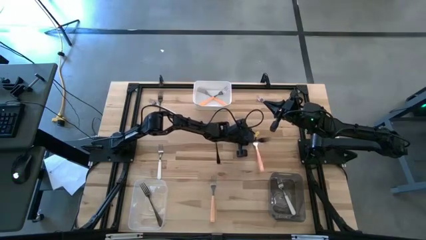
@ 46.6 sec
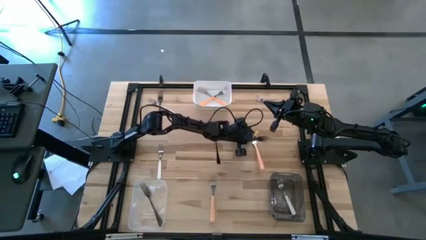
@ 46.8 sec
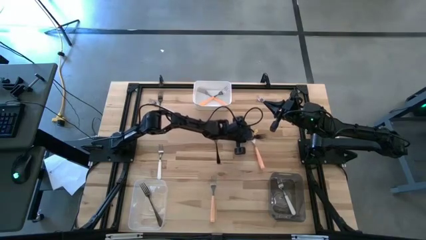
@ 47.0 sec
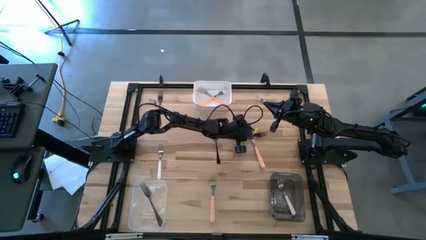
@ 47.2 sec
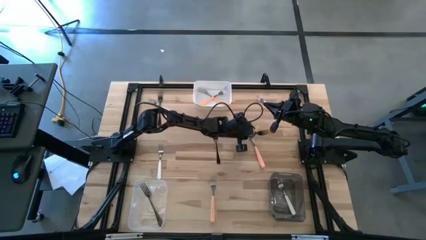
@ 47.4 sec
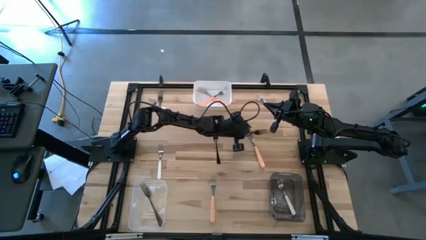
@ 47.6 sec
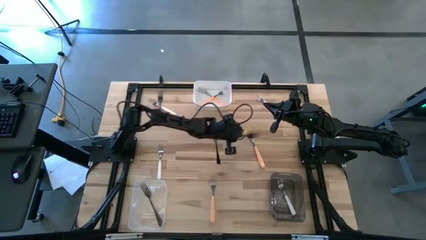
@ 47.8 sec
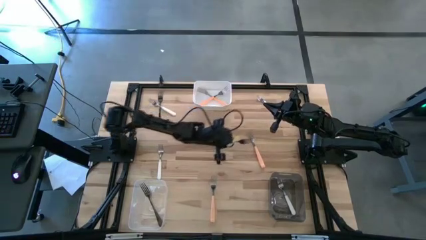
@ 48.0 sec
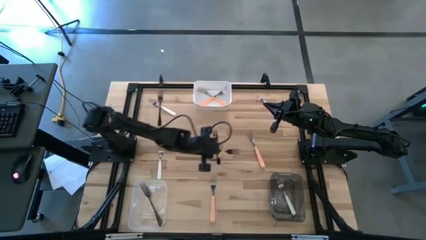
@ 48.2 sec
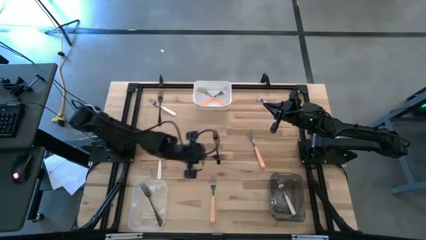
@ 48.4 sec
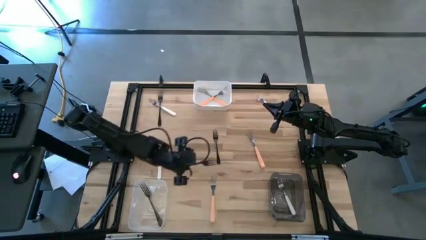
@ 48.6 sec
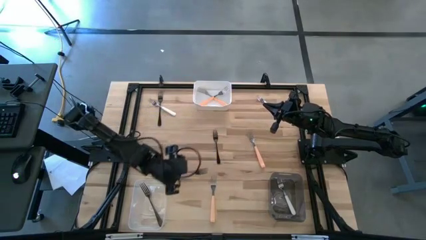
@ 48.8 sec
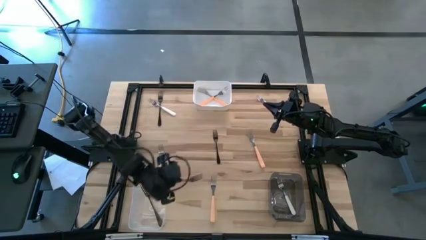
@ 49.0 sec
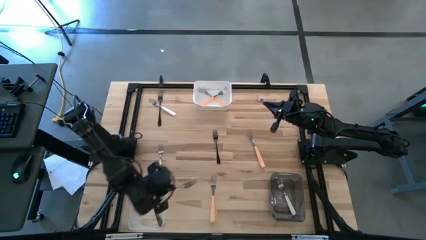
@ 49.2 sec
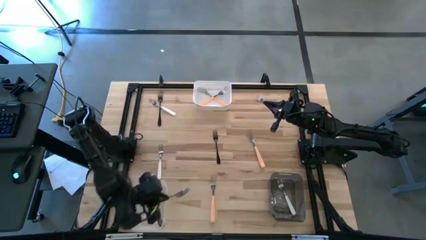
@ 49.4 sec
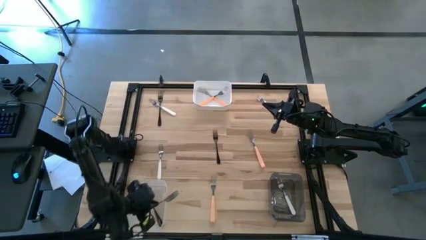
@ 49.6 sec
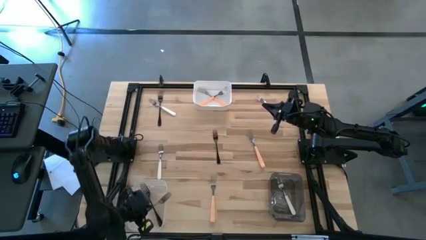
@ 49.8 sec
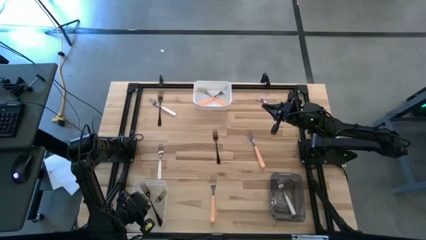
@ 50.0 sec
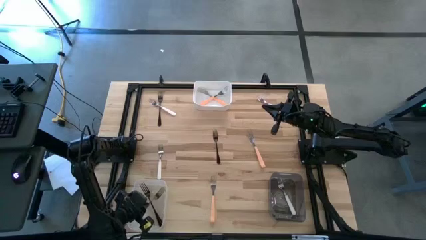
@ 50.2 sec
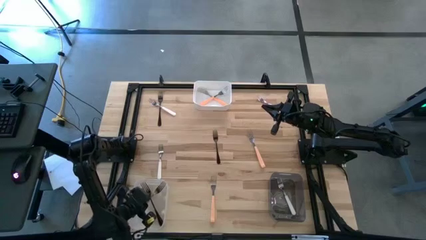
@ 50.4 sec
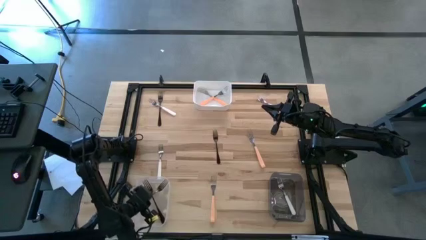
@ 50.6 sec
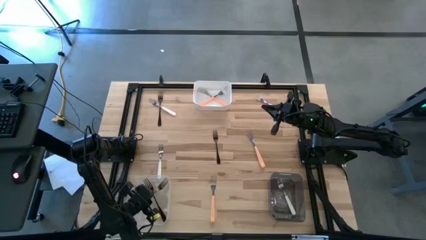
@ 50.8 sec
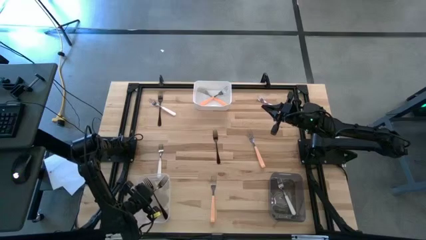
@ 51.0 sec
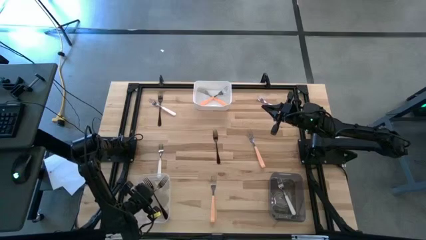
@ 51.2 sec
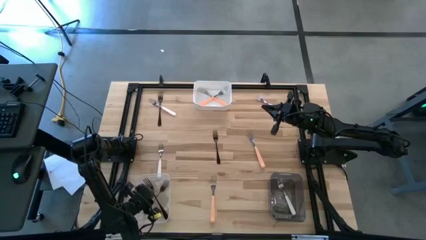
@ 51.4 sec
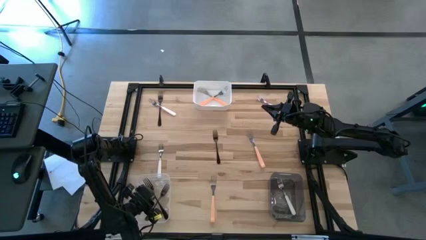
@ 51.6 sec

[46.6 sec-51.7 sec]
Task: Sort silverware by color (type)
Put the middle right silver fork into the transparent bin

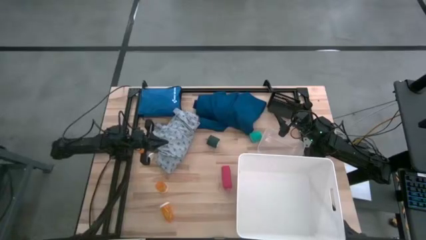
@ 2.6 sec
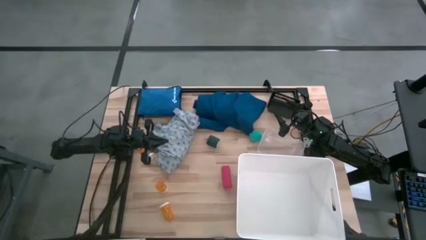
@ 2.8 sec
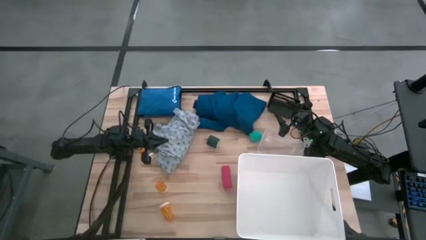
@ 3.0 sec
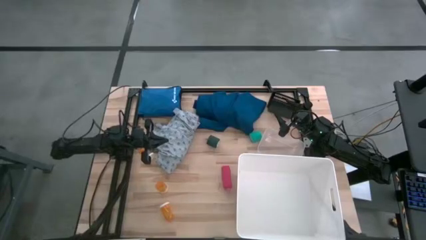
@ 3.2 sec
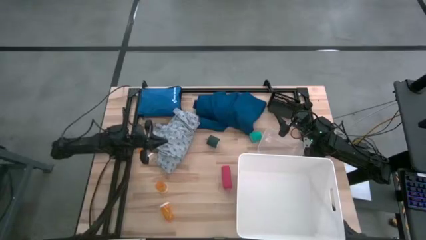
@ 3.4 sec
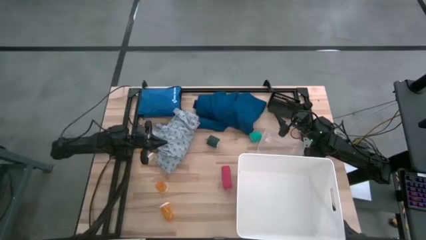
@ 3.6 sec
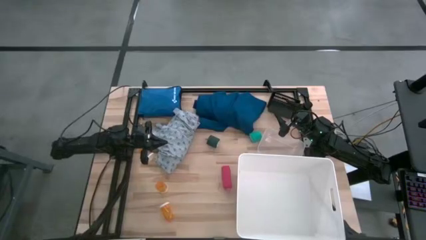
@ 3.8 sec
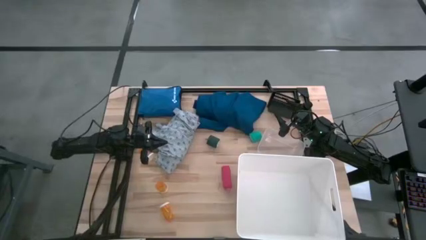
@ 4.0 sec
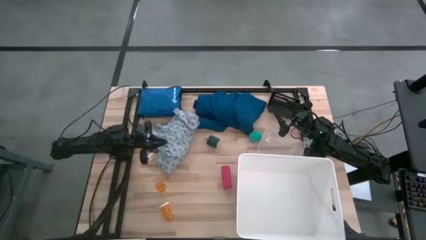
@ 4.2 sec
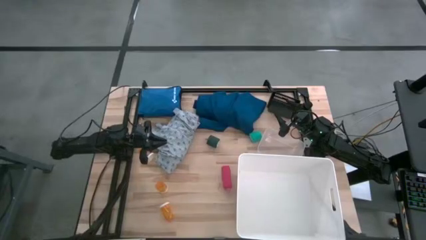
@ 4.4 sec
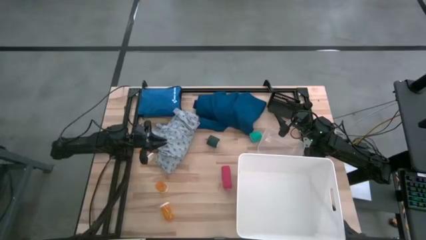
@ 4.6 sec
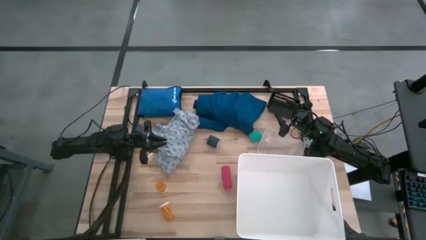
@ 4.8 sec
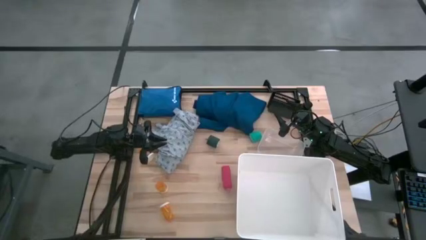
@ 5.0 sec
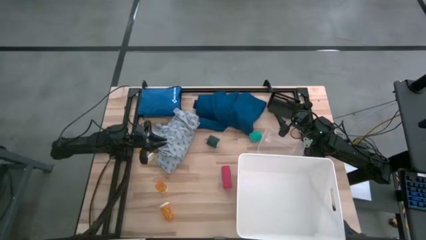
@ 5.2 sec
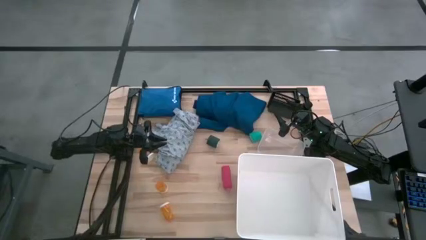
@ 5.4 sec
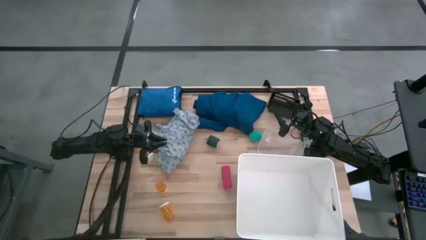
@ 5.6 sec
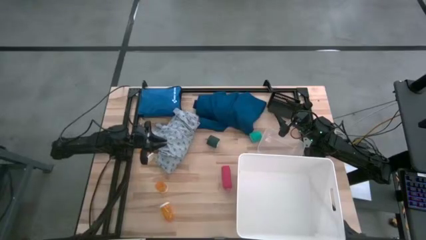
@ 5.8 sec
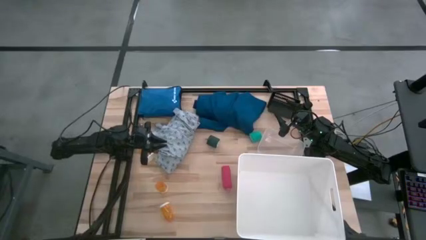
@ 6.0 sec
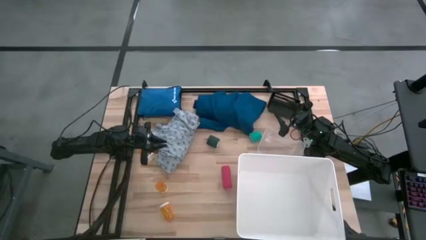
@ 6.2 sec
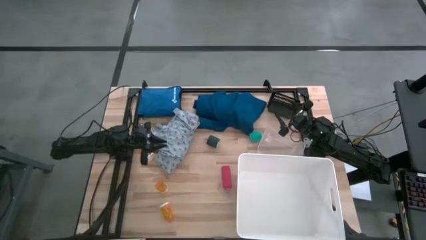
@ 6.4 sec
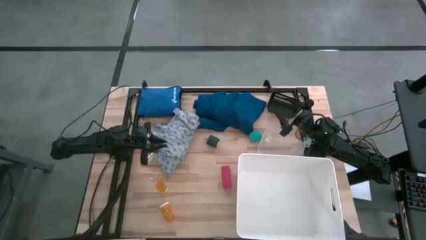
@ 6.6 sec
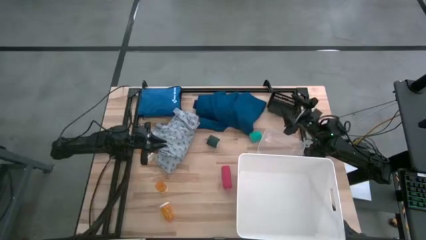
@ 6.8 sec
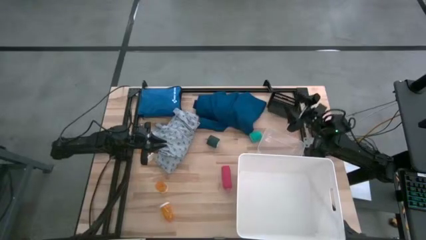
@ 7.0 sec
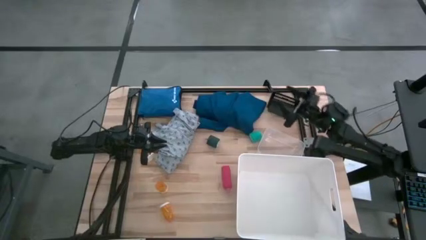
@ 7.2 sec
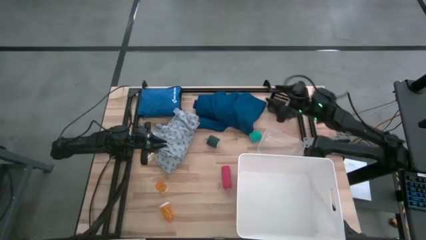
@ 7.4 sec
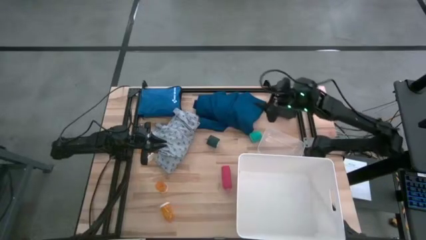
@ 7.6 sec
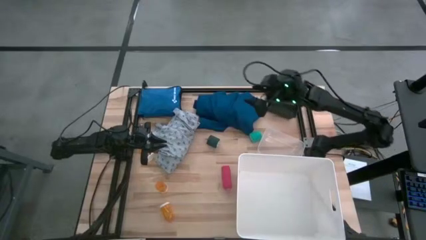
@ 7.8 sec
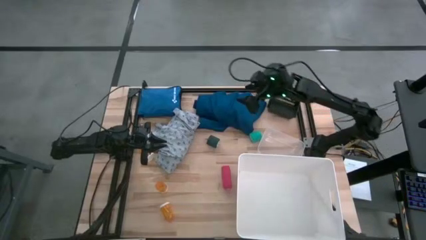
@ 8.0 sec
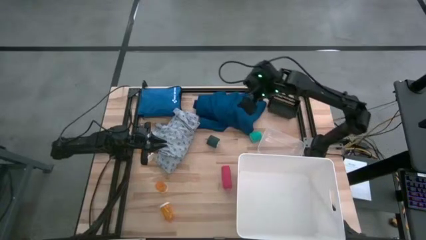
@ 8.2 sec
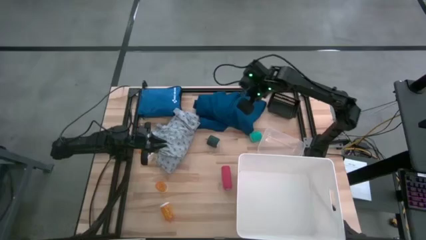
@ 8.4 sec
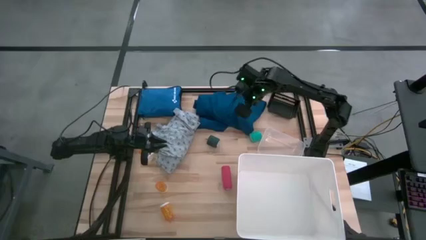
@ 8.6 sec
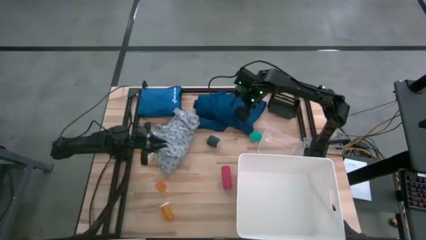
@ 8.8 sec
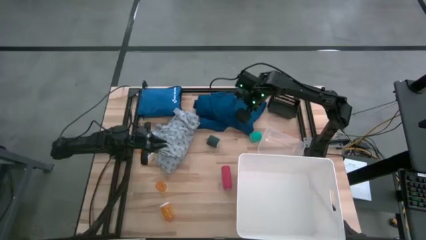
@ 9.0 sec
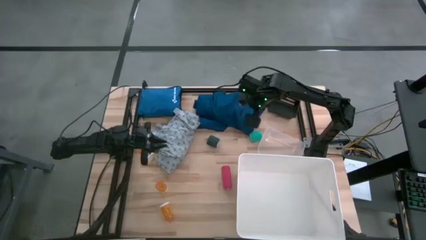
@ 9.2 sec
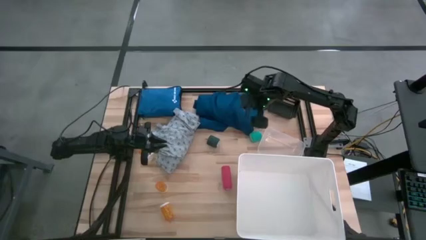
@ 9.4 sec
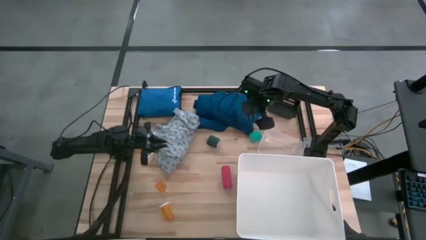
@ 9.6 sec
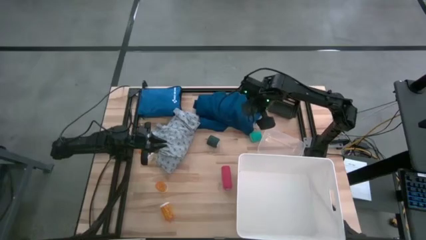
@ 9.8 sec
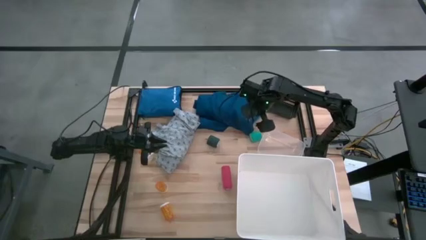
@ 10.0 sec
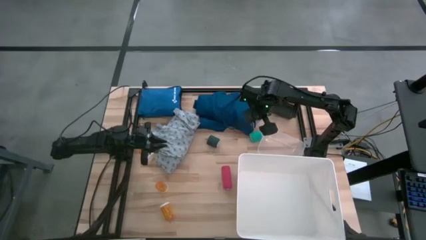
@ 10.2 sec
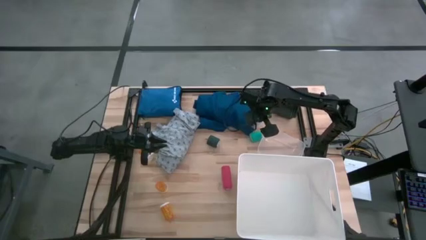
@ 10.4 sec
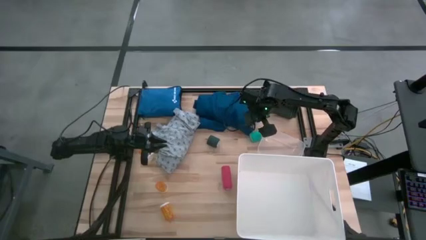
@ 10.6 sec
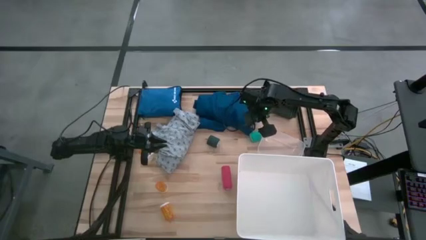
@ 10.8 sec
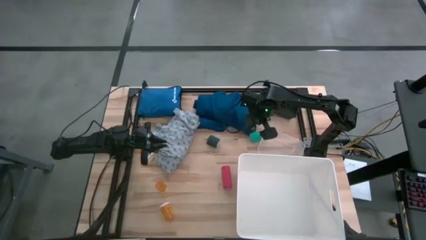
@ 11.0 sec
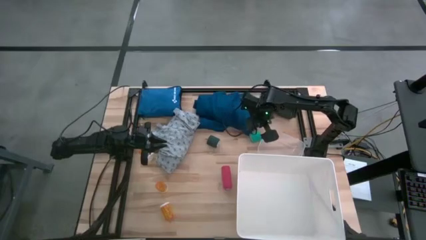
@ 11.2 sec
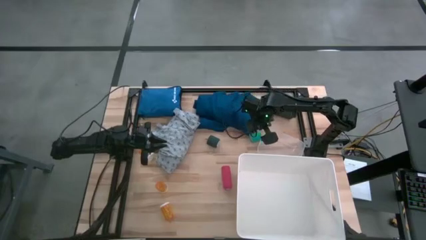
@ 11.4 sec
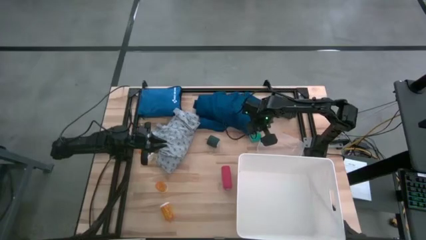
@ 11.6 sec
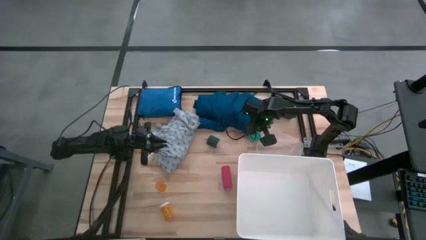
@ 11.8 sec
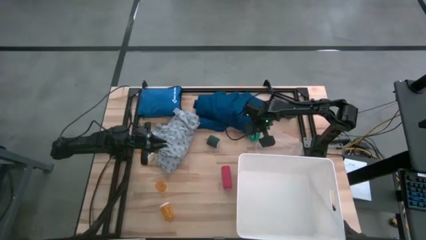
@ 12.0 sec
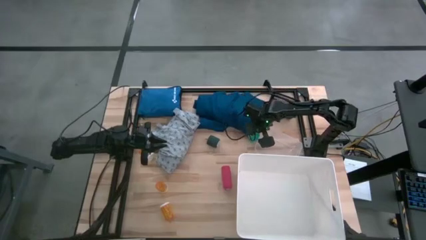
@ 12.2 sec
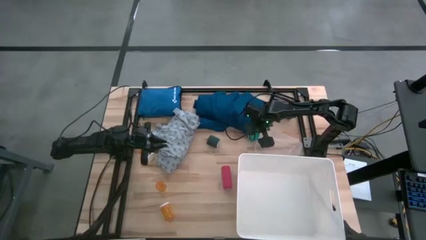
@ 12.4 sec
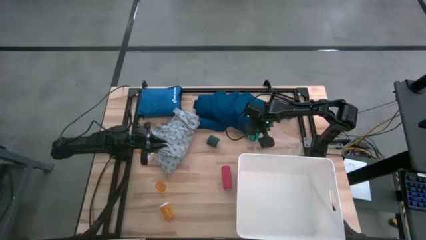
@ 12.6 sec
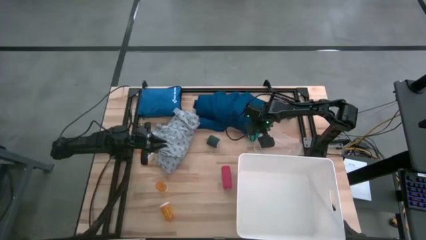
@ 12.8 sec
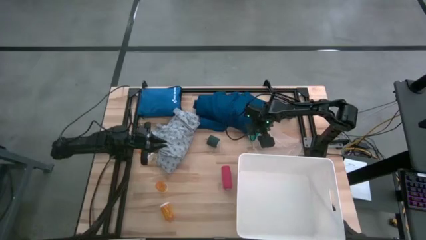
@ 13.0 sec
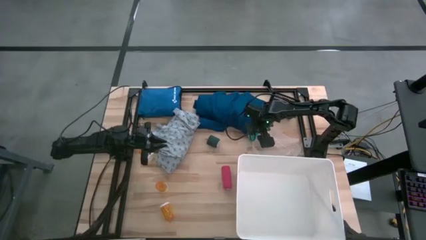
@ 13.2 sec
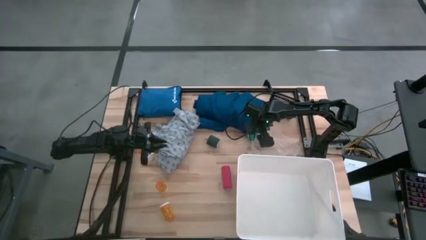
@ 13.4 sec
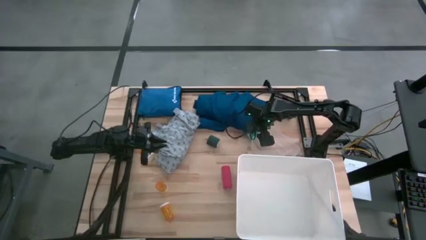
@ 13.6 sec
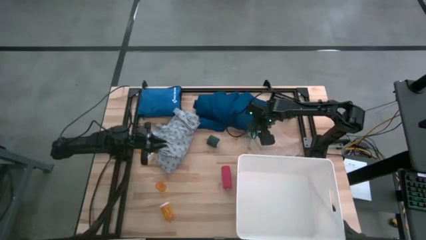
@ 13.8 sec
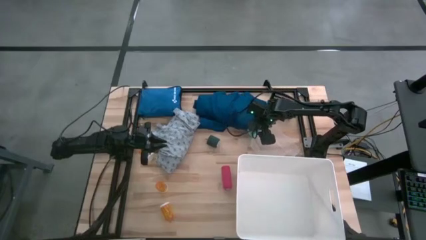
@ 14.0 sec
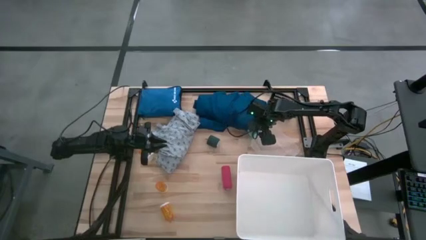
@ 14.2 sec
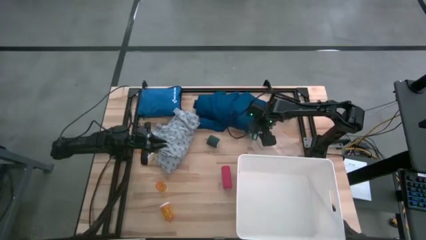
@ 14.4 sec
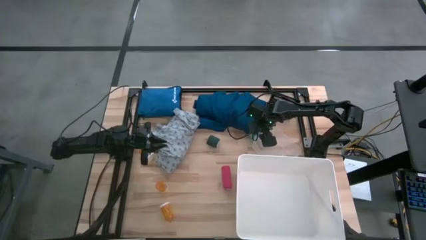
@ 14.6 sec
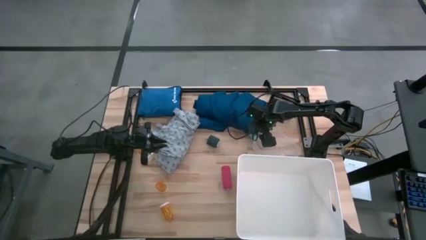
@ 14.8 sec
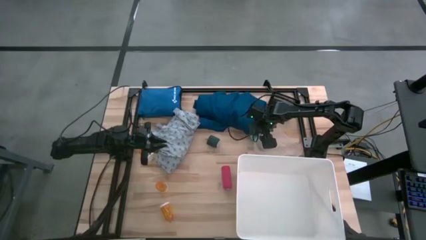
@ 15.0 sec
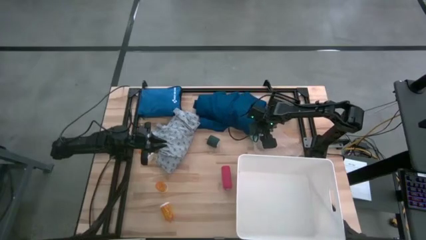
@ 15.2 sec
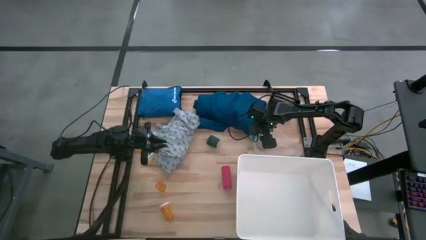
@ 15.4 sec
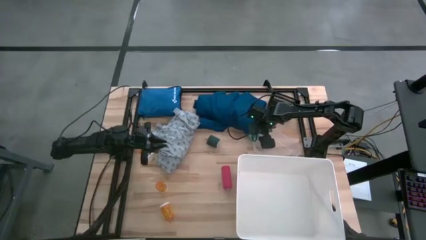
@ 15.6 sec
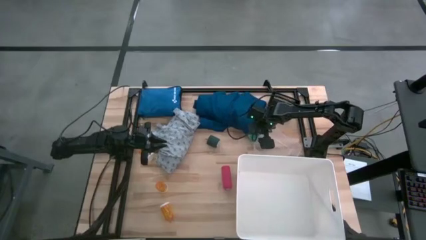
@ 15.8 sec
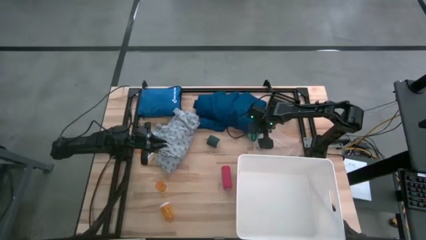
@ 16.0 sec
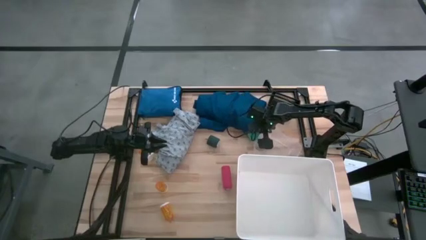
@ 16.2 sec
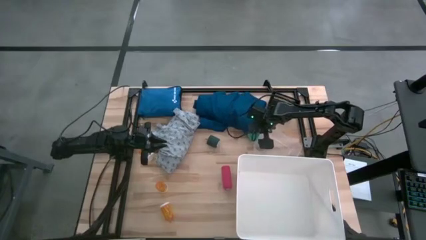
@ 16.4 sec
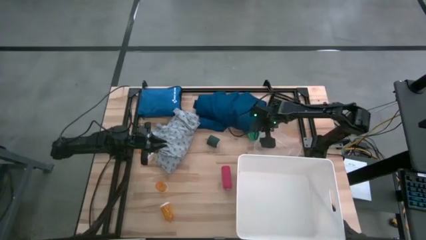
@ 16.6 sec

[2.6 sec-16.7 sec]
Task: Pick & place medical supplies in basket/bin
Put the light green bandage into the black bin
